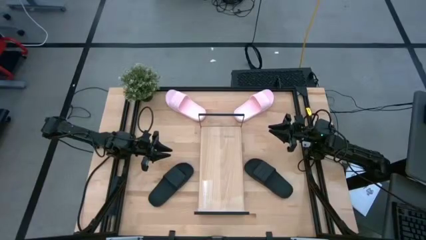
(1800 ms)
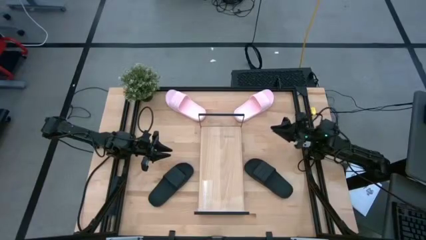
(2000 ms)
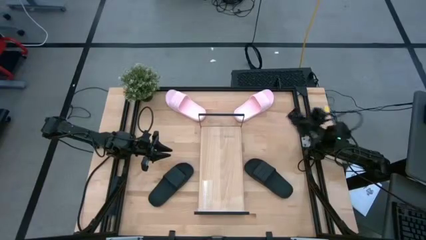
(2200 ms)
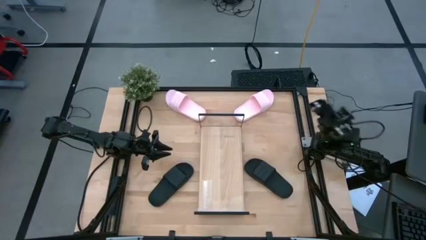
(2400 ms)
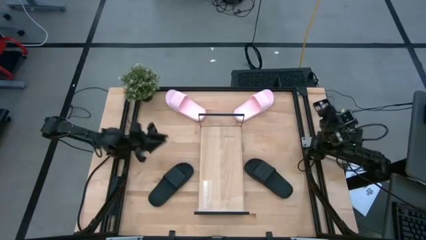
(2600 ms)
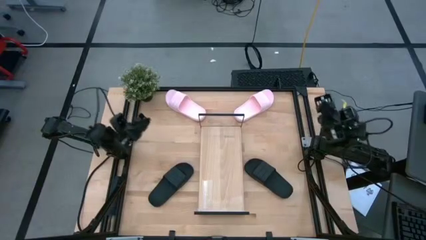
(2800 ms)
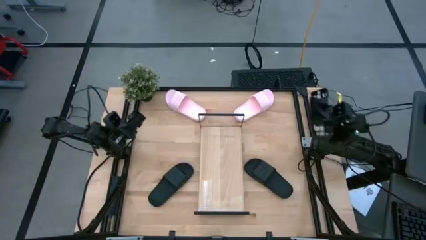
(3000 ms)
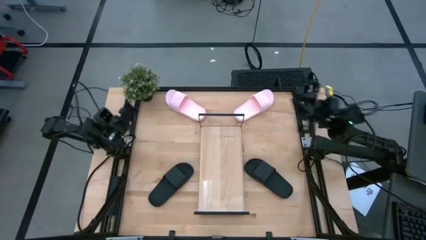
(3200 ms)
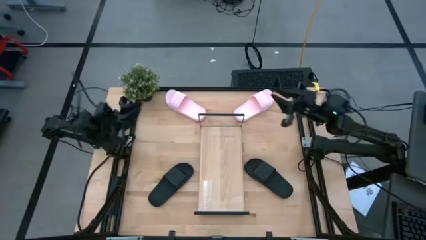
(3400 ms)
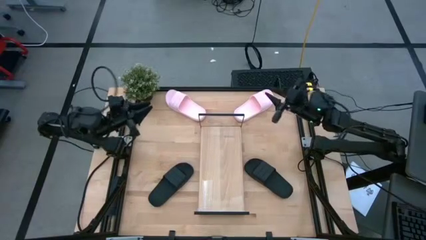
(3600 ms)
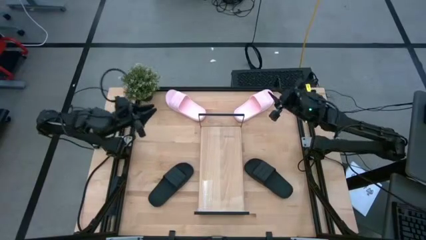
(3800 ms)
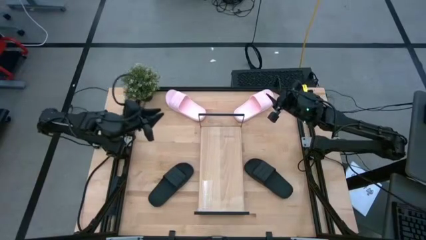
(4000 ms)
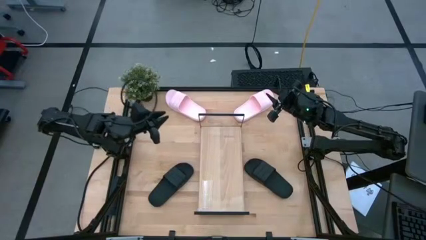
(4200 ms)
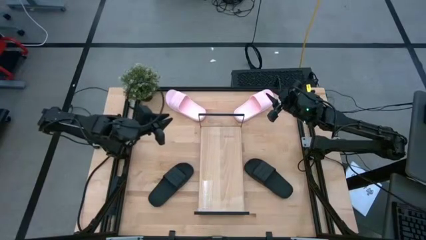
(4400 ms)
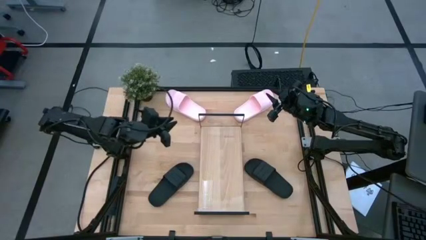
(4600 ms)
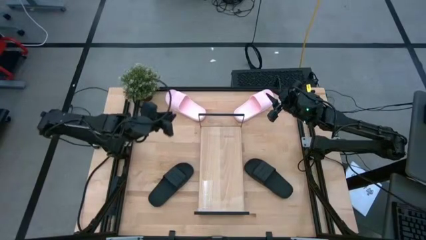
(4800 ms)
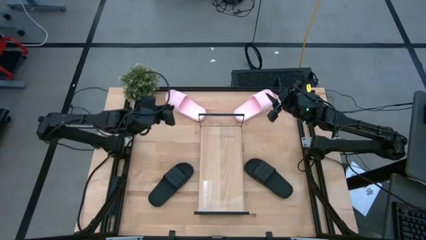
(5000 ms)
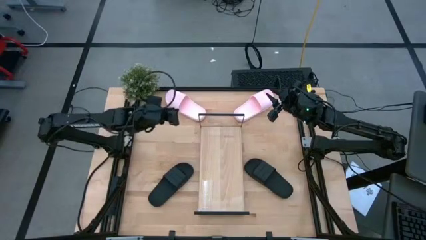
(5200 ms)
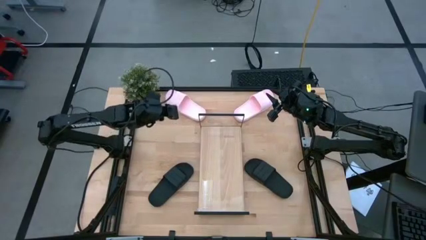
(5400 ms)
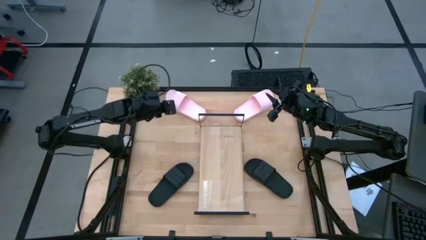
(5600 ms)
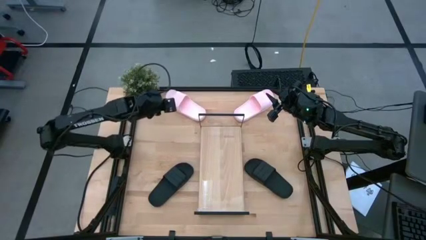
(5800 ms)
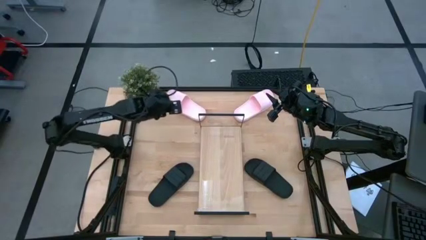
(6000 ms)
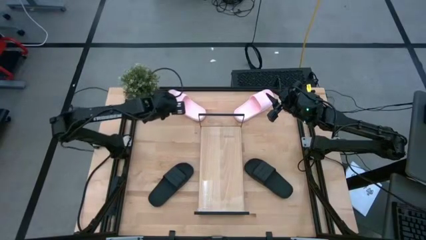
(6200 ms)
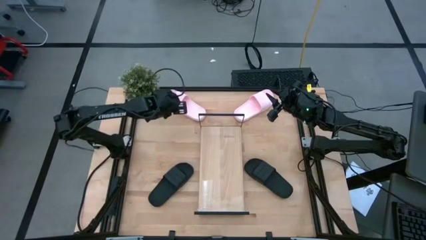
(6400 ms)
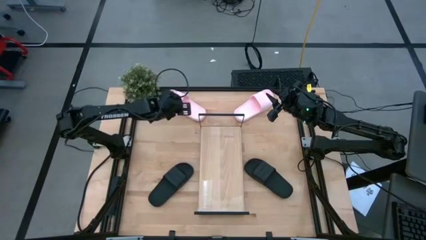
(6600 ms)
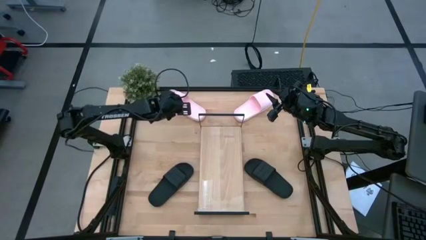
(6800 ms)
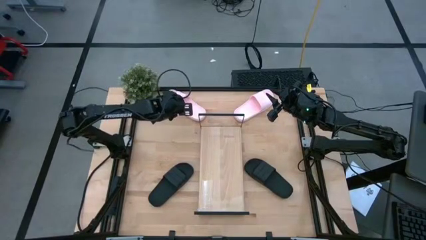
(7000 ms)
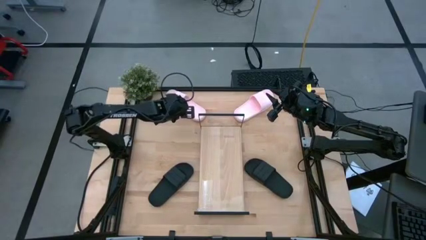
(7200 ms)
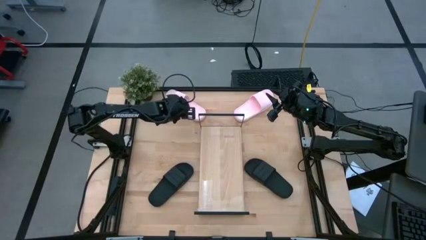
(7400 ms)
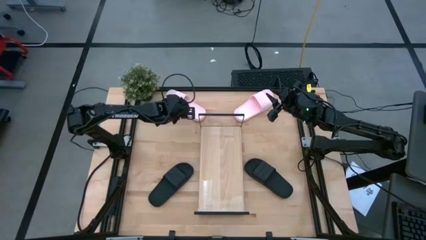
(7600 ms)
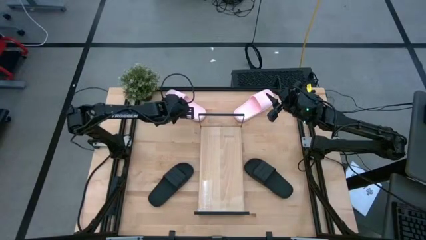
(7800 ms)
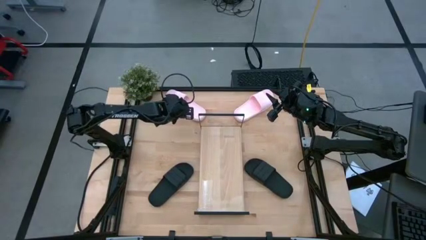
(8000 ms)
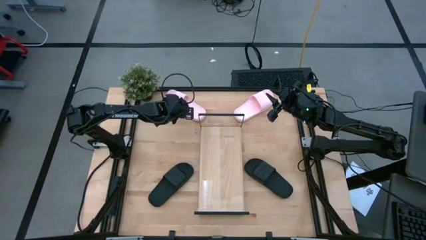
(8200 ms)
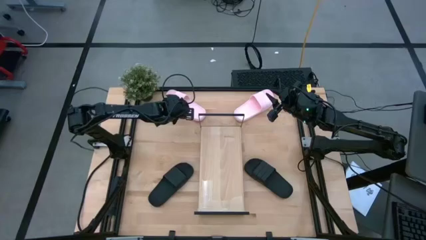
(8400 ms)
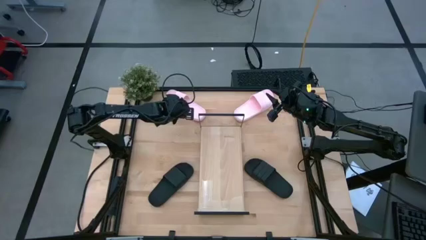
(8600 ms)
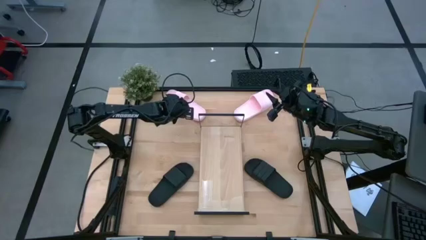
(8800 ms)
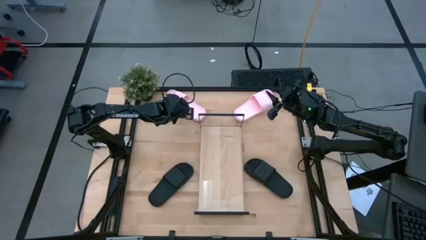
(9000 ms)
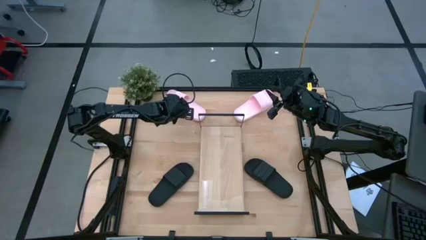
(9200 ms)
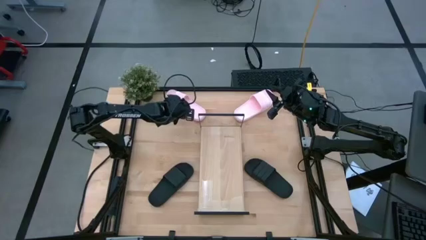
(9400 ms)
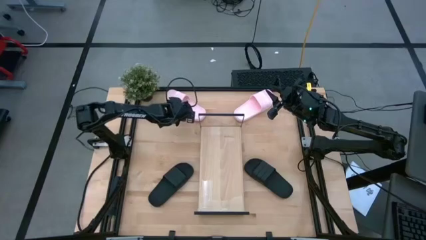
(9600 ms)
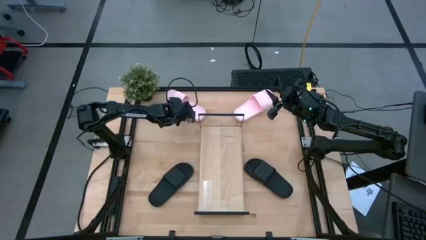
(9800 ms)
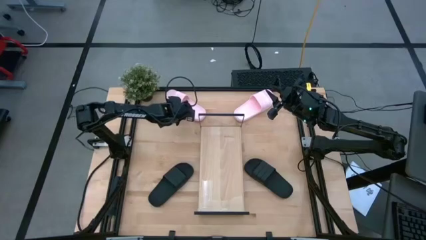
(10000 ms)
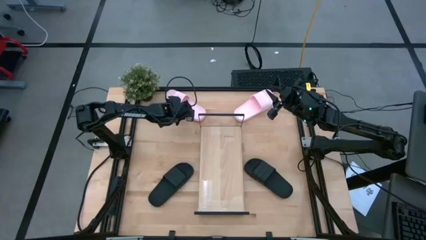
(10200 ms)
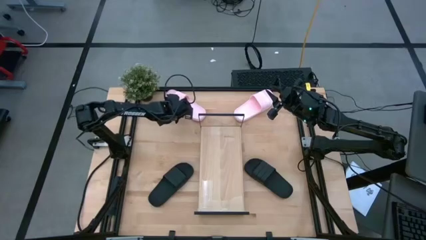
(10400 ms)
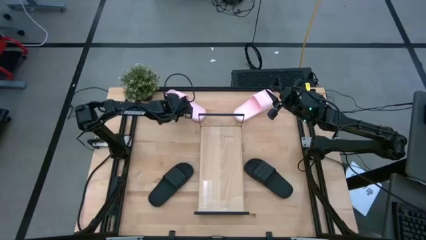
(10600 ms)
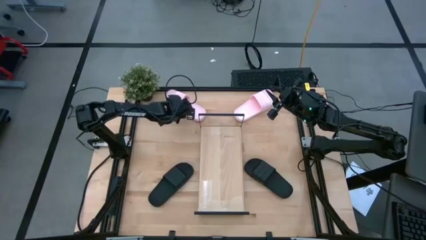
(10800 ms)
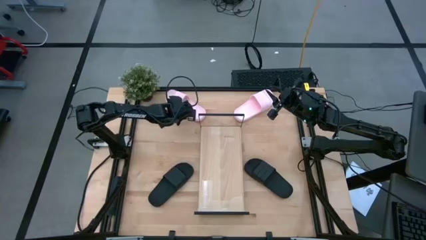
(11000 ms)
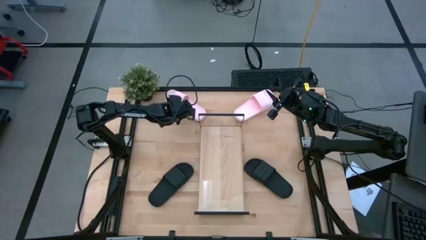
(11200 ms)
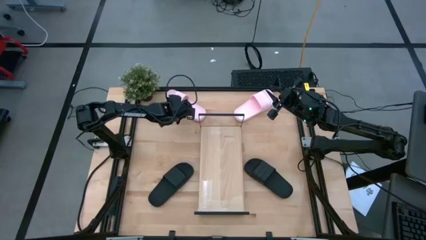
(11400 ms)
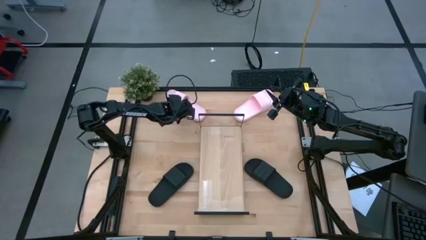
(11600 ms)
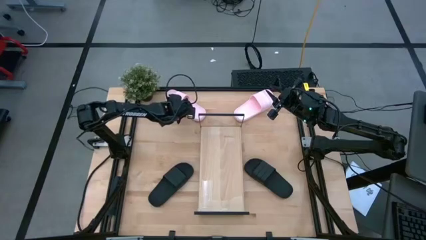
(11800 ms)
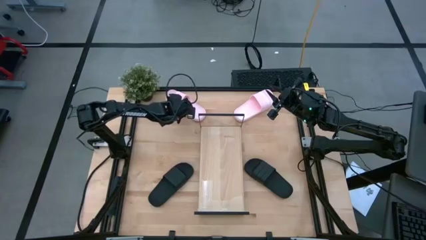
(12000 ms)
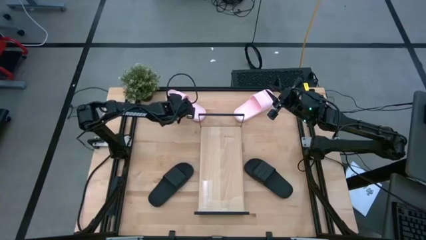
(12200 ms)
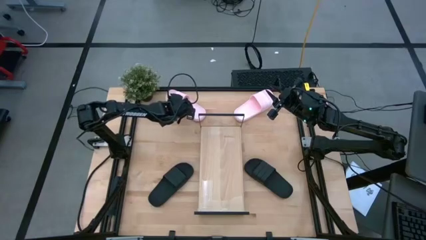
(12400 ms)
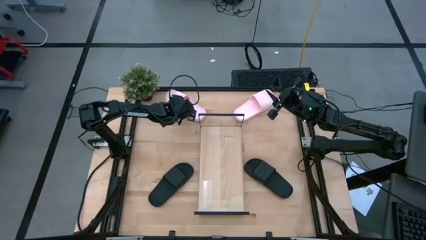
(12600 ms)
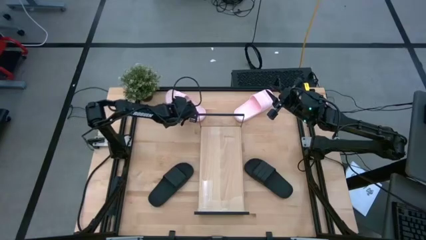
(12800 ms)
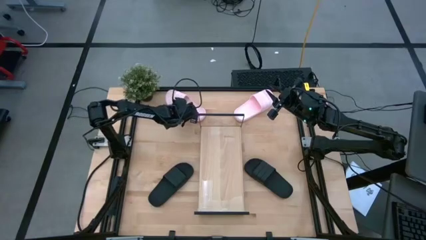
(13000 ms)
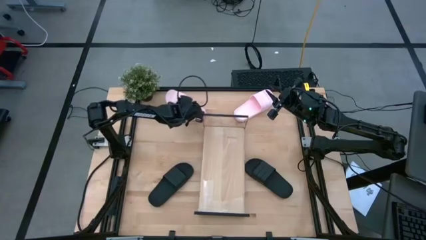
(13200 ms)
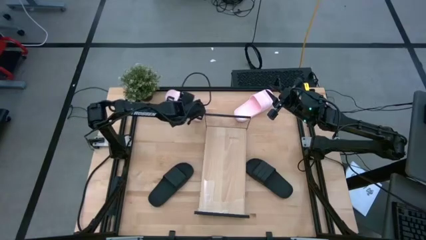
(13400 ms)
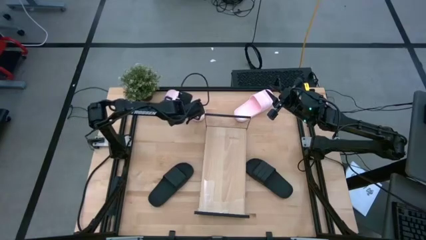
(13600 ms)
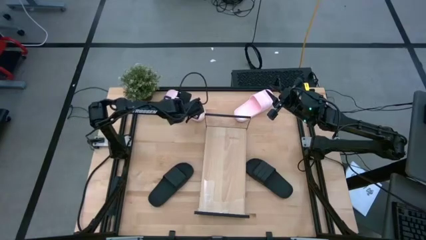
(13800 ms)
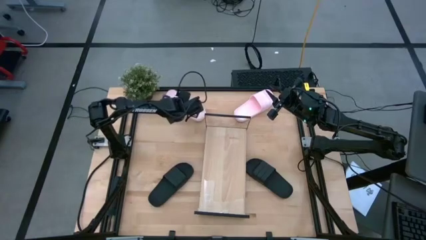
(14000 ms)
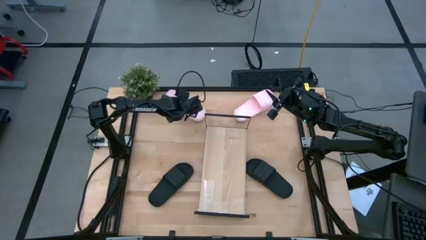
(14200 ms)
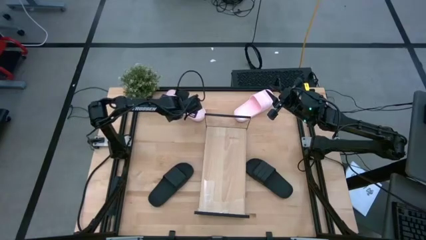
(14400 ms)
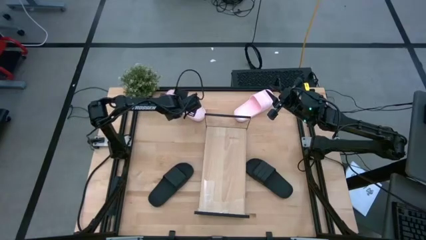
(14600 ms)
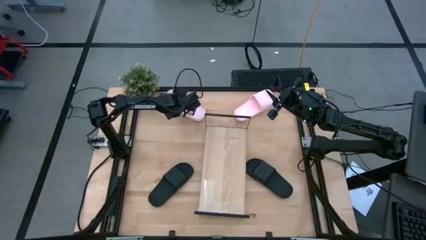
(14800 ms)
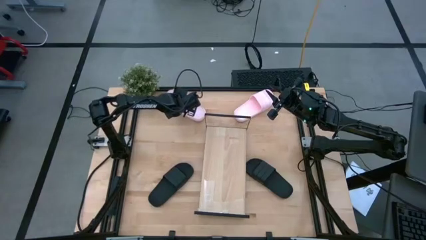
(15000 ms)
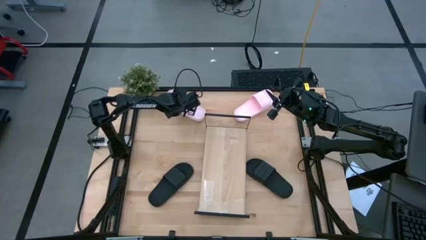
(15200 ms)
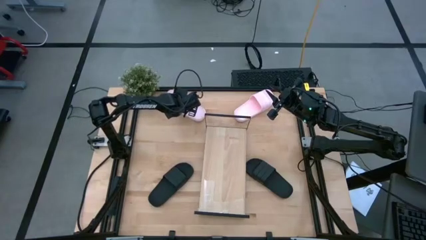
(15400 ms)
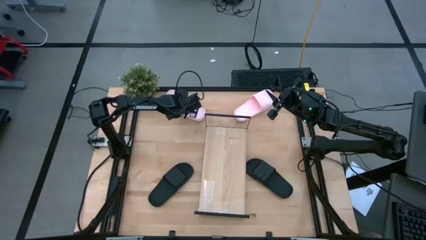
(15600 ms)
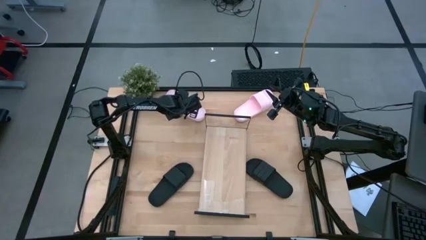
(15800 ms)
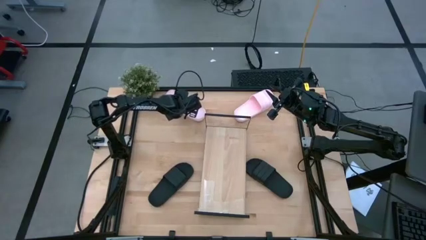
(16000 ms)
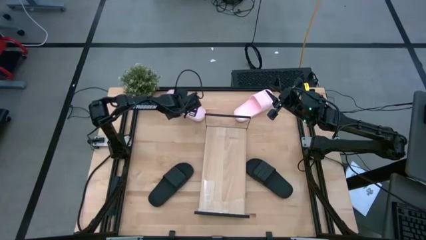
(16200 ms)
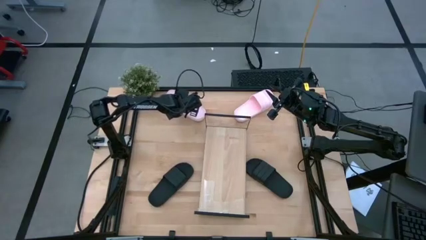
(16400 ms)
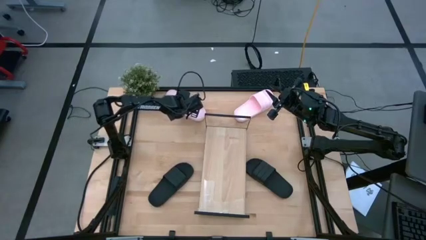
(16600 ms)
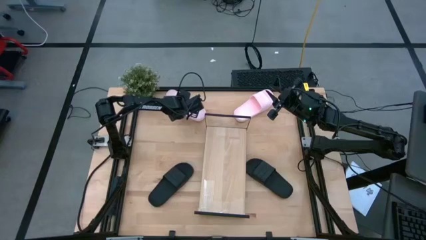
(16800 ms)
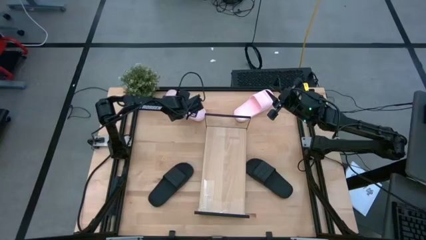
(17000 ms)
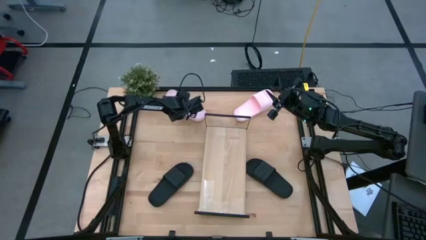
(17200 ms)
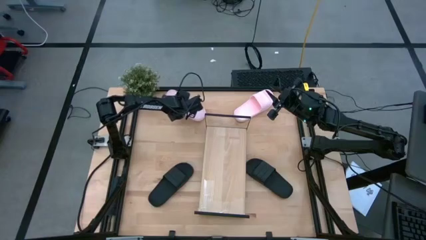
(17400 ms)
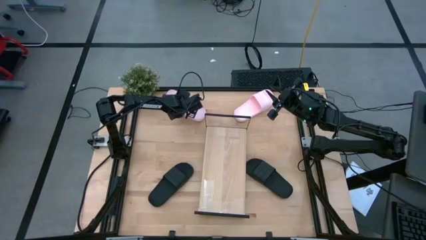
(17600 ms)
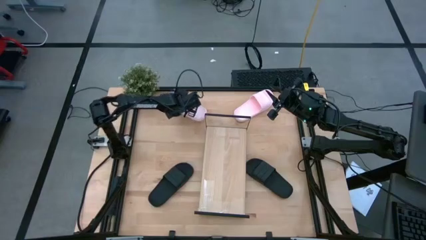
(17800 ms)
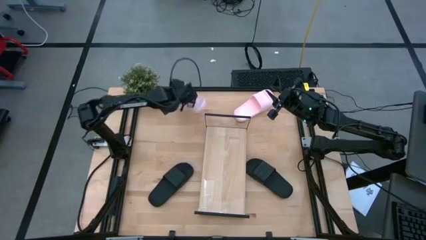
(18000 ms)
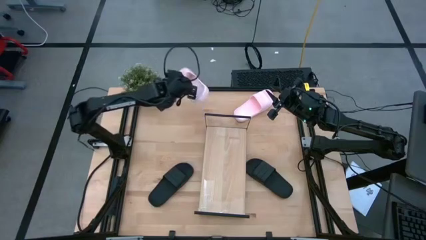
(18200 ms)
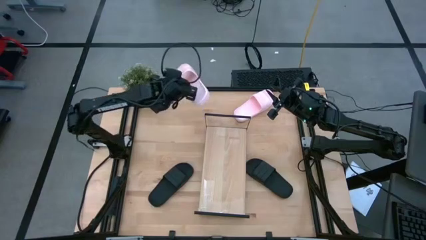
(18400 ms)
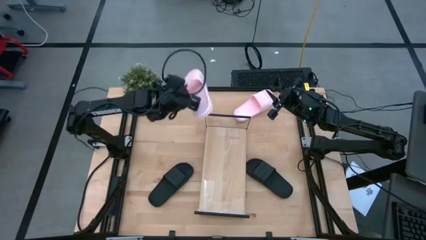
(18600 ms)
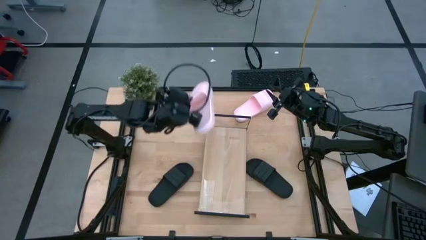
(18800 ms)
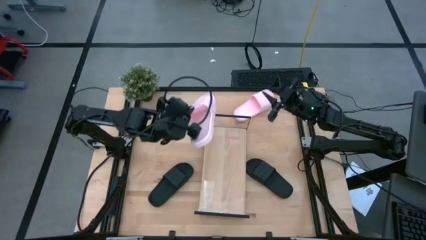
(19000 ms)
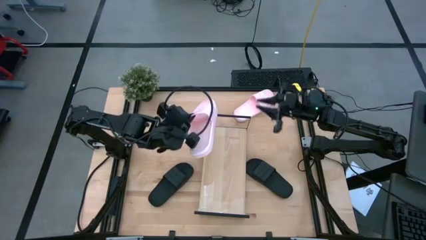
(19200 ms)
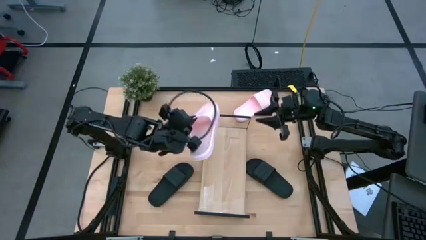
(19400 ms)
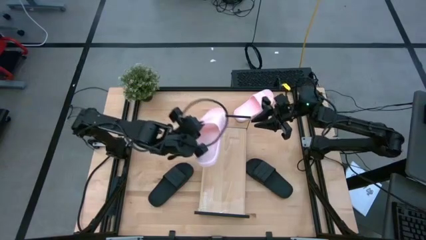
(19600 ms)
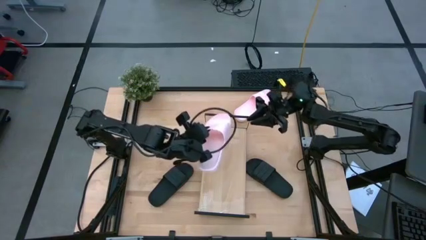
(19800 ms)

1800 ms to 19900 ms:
Task: Pick and place slides into the shelf
Put the left pink slide on the shelf
